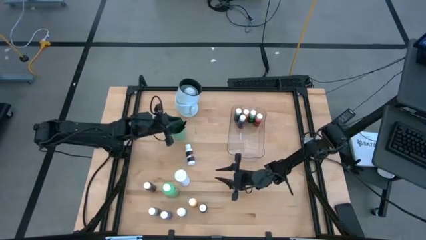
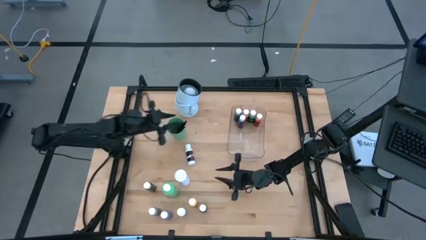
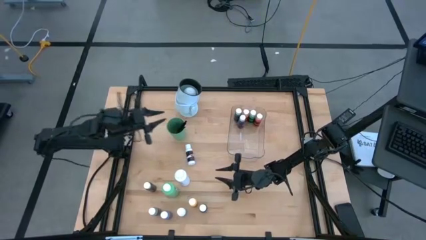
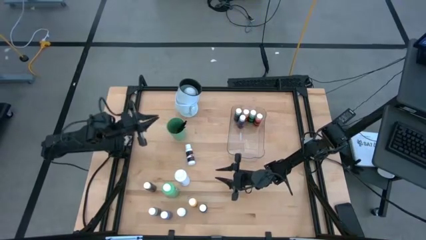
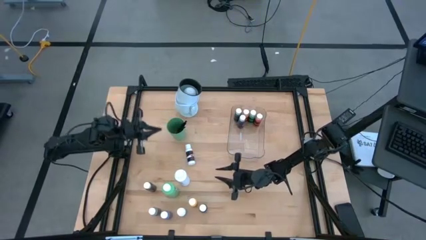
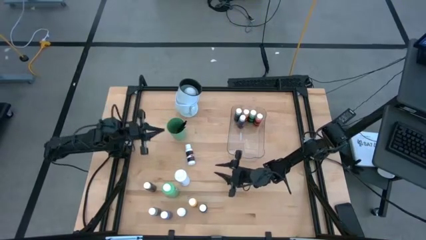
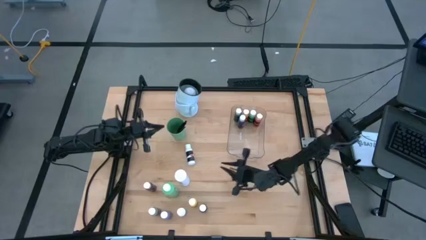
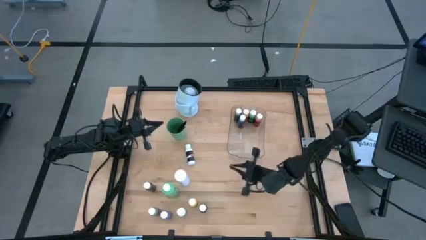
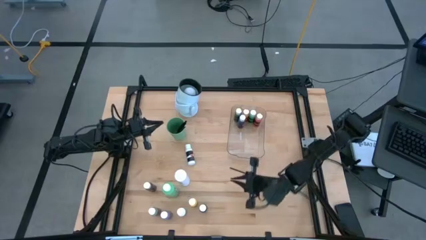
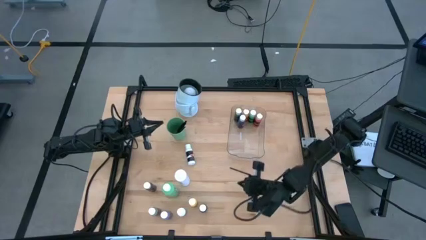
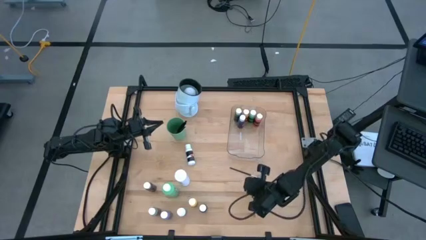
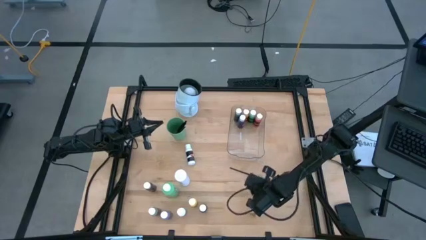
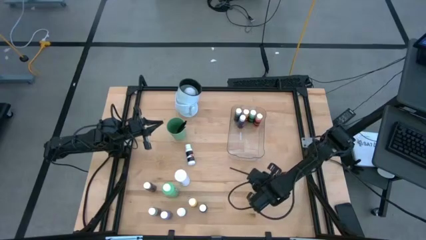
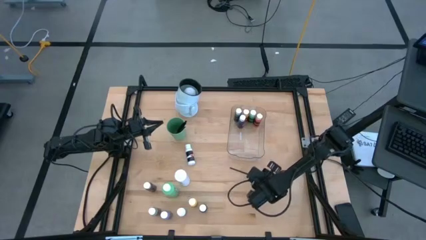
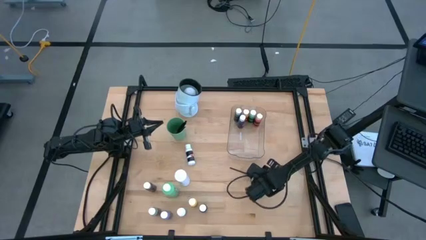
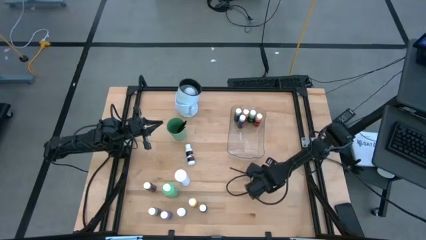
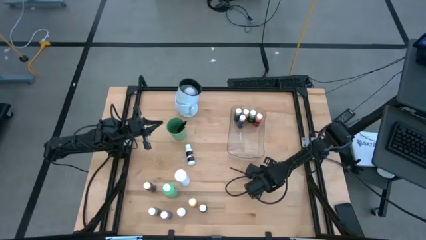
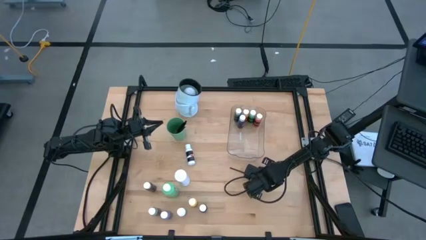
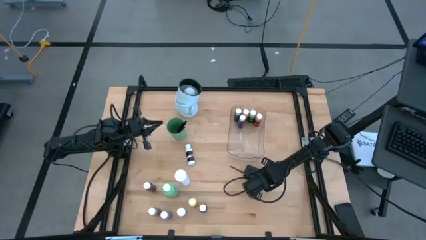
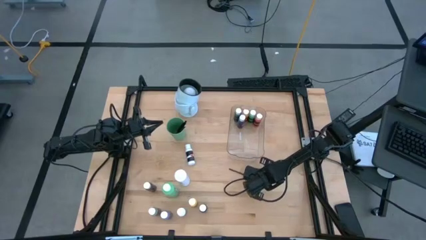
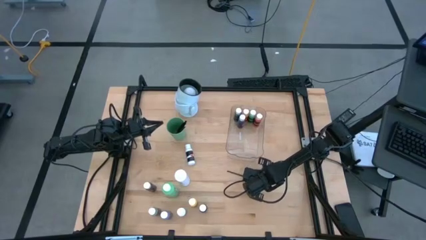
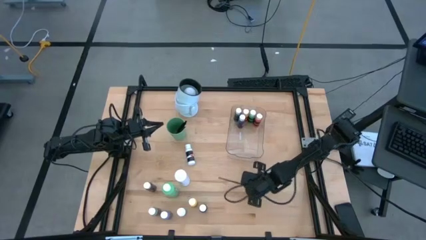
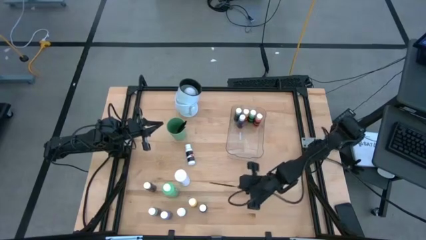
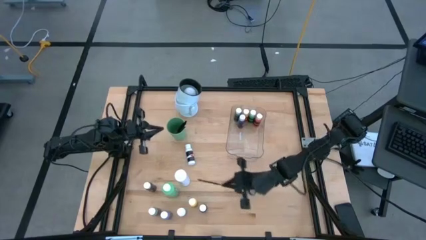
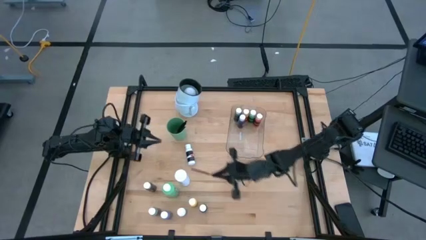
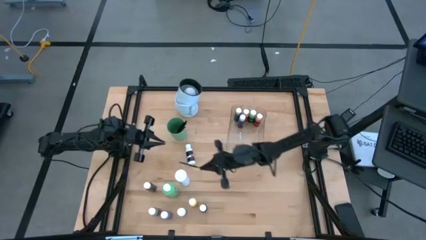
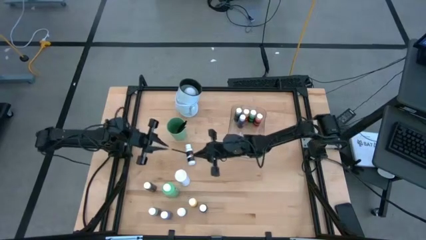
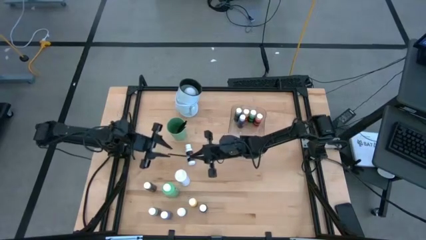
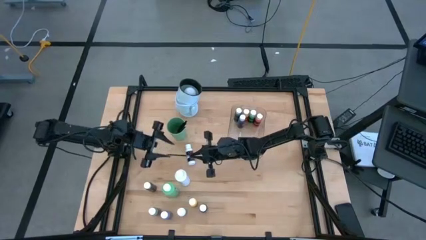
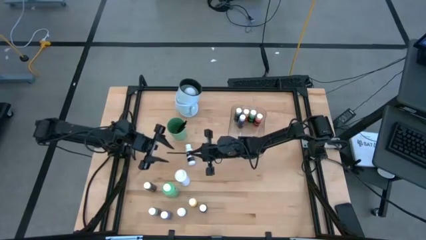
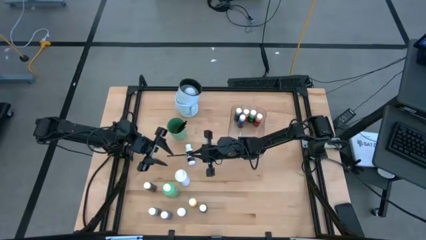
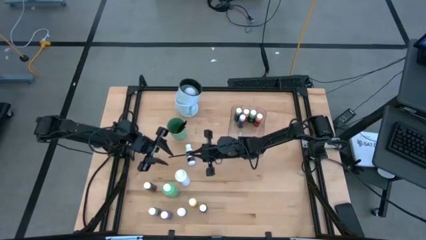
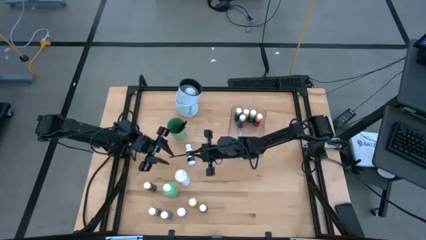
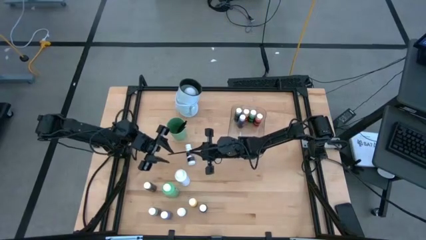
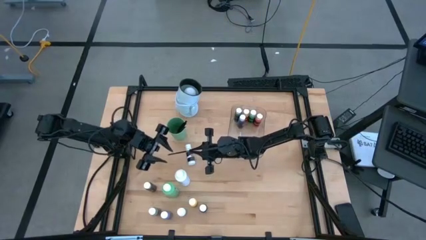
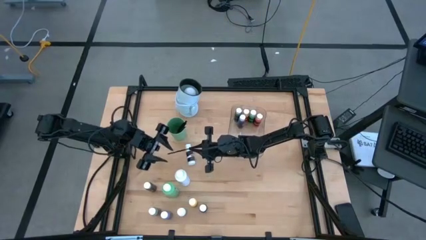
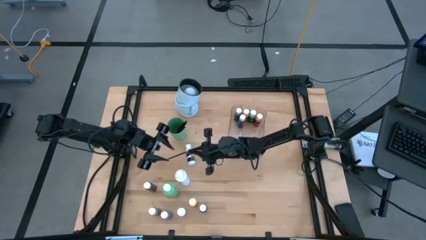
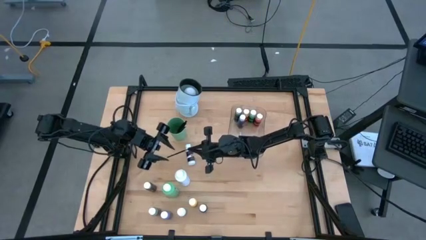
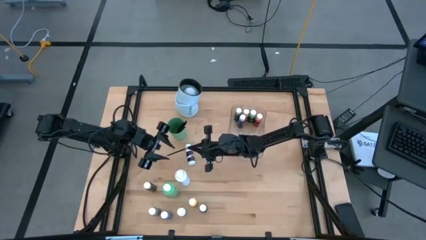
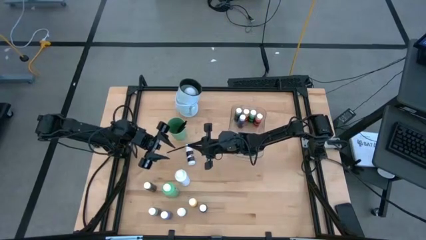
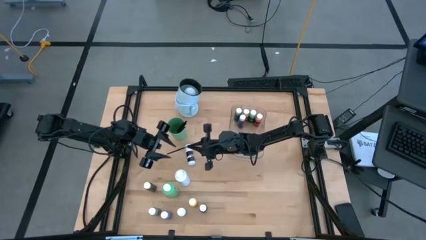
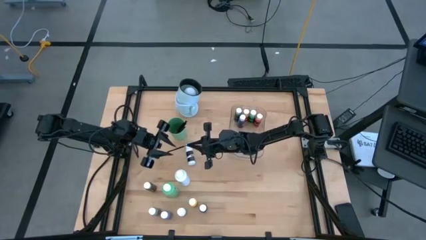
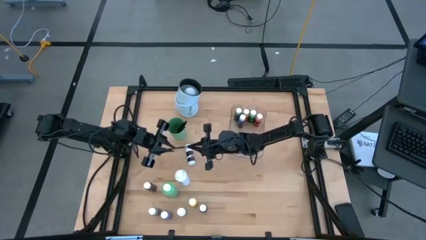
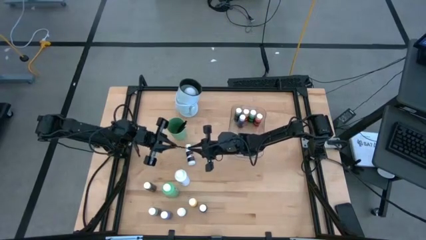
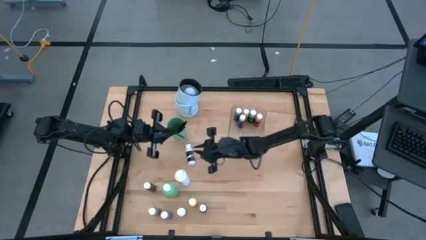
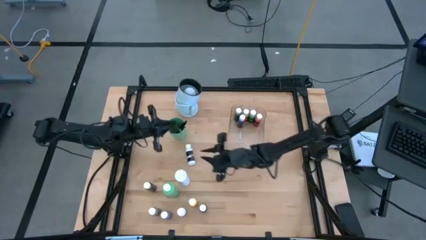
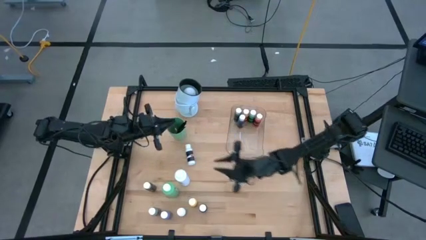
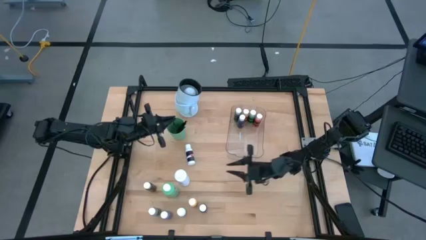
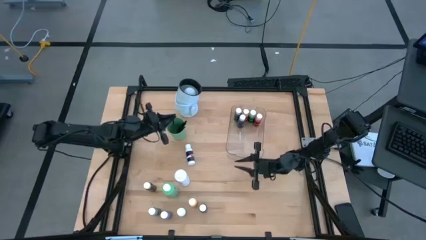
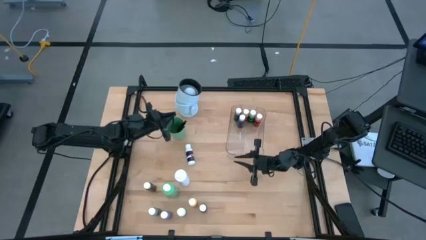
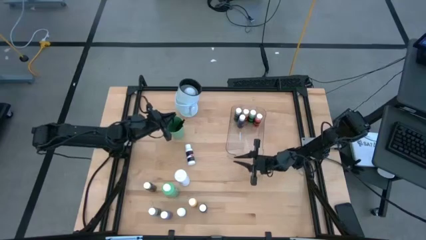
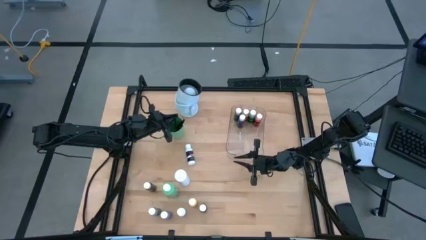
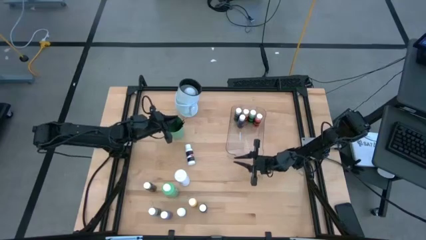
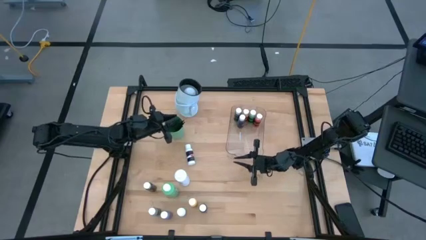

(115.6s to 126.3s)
Task: Pick & Place Paint Supplies
Put the paint brush into the cup

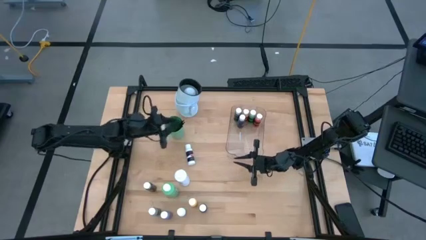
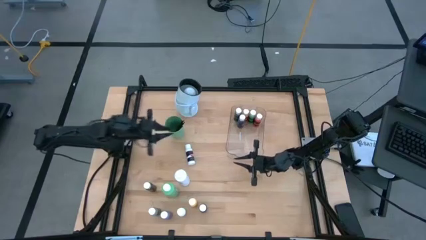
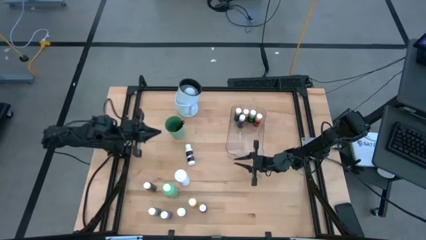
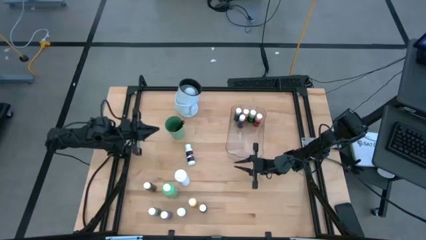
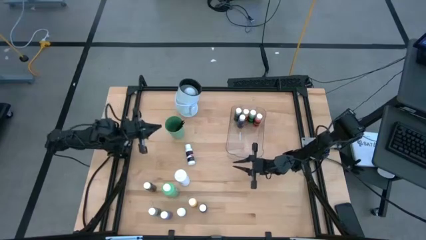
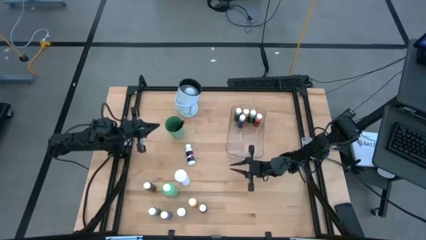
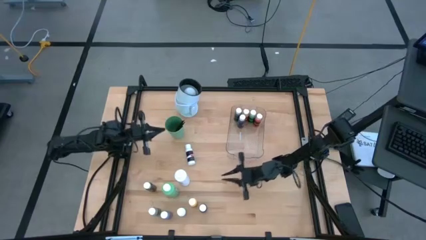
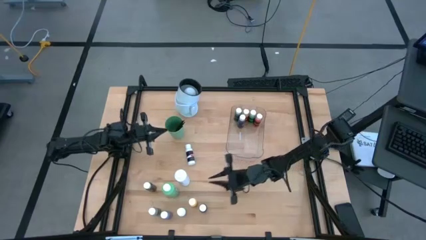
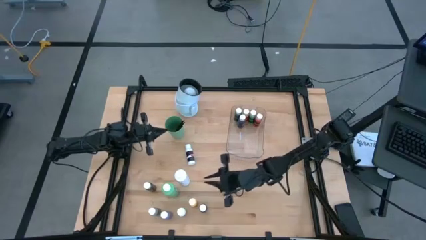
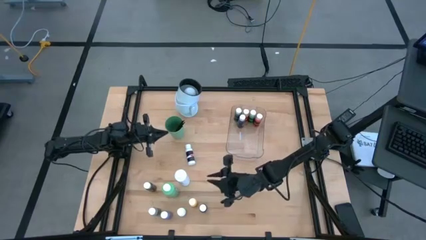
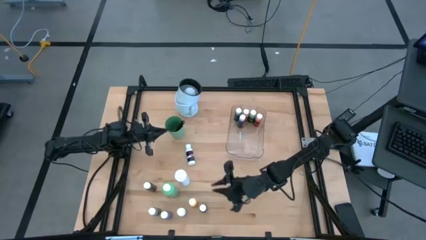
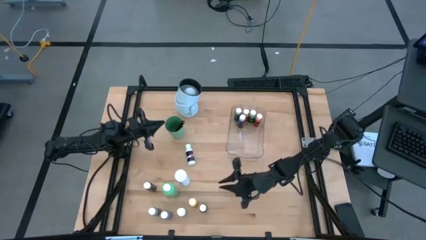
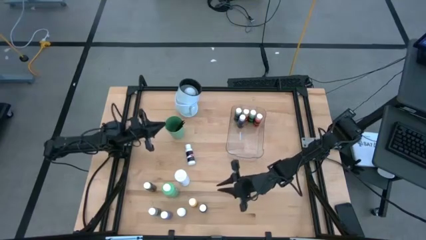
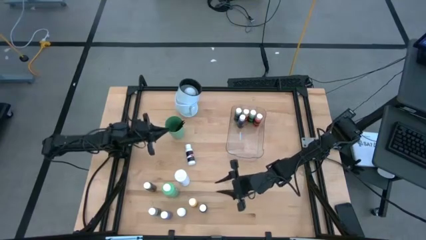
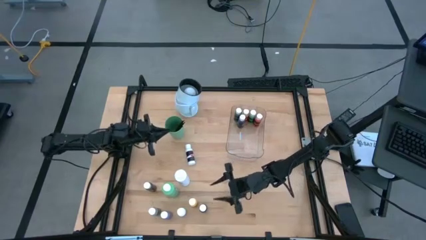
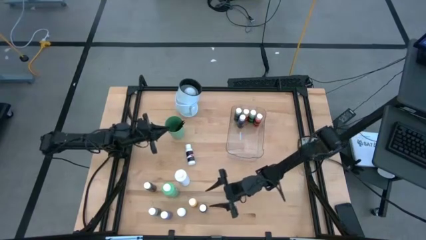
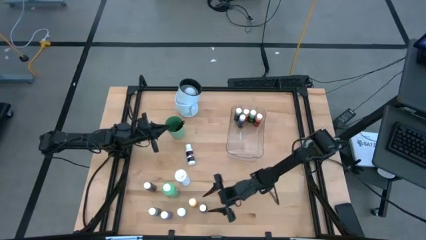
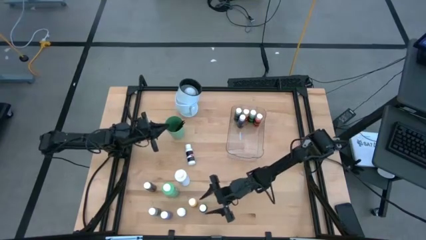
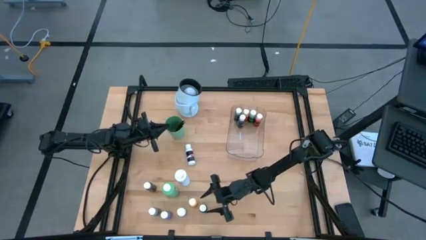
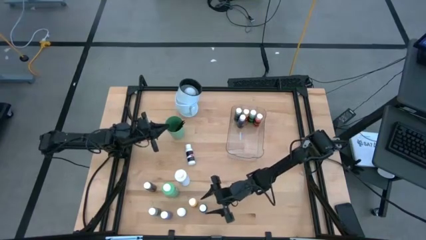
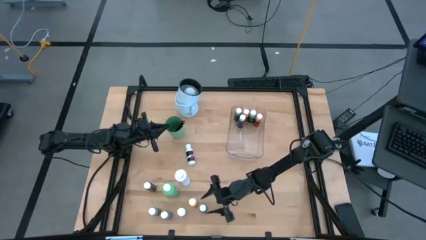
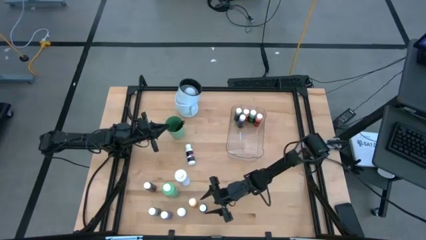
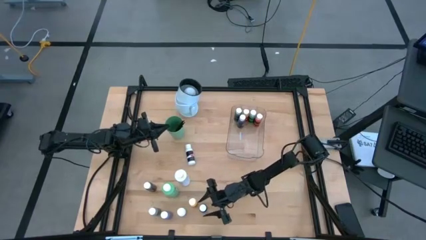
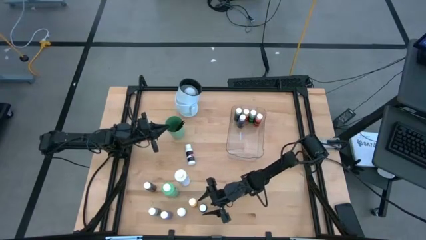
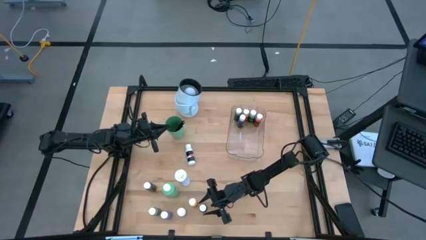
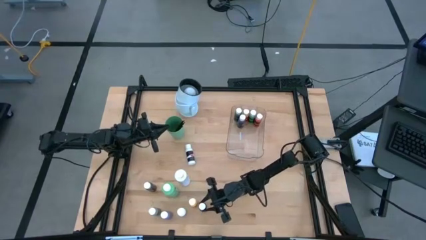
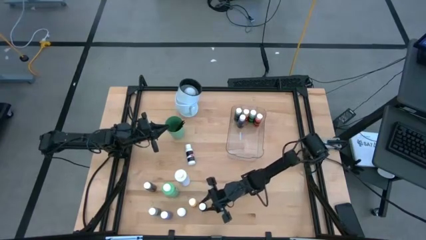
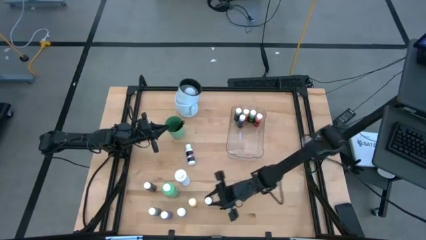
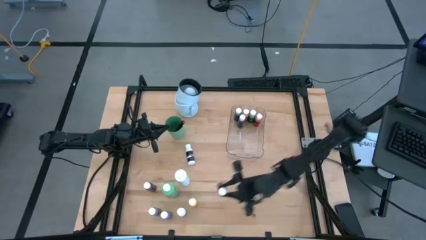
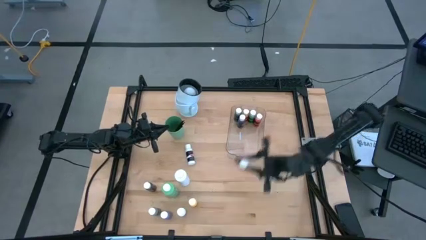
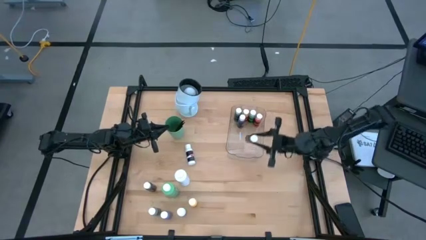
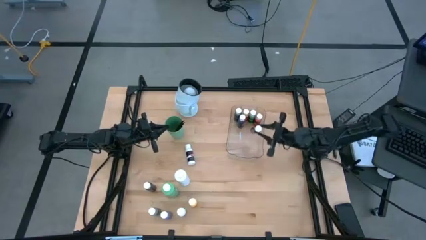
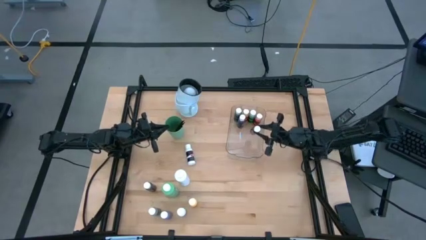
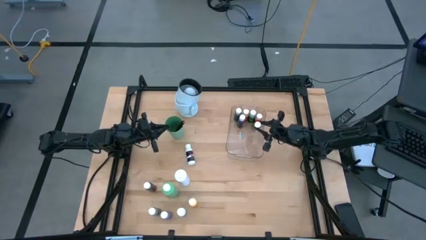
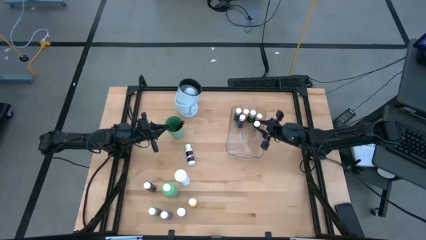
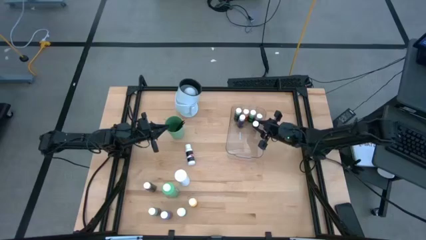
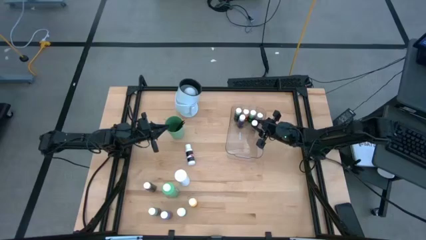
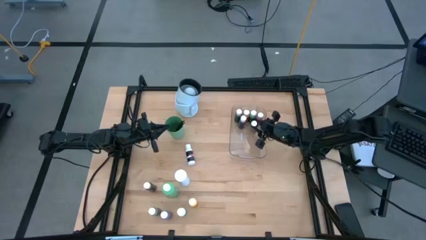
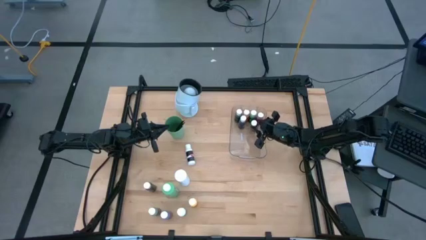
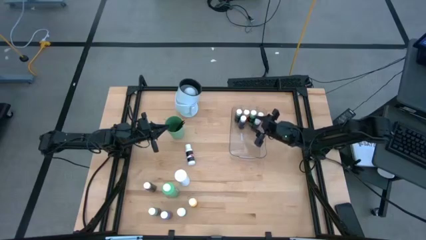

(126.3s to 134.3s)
Put the black paint bottle into the transparent bin
